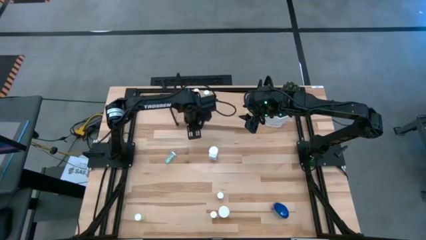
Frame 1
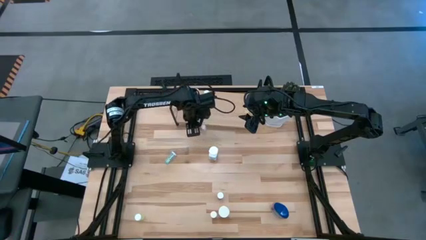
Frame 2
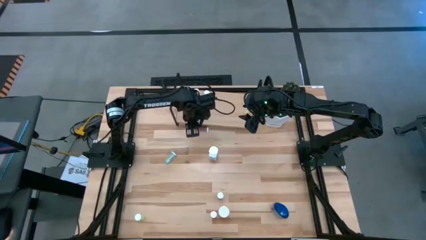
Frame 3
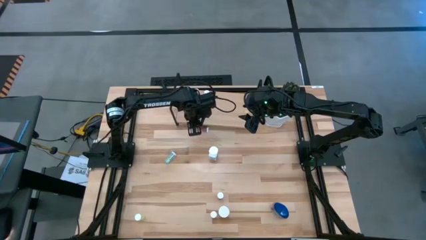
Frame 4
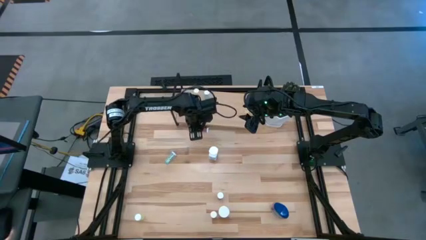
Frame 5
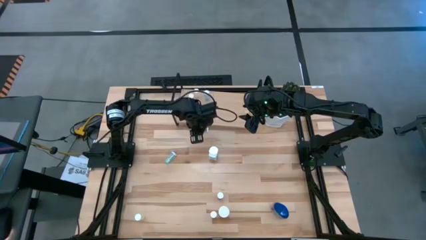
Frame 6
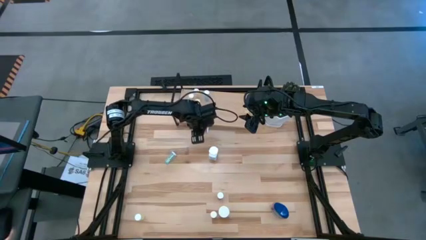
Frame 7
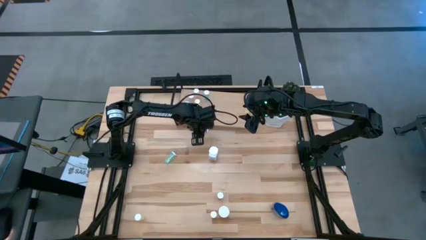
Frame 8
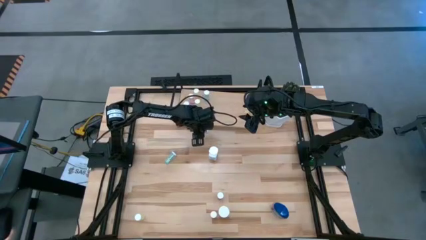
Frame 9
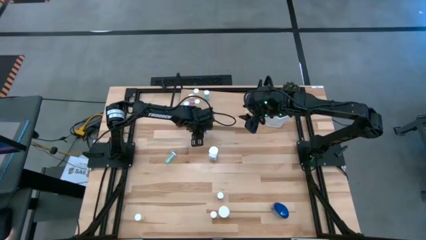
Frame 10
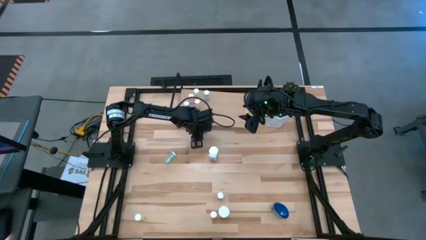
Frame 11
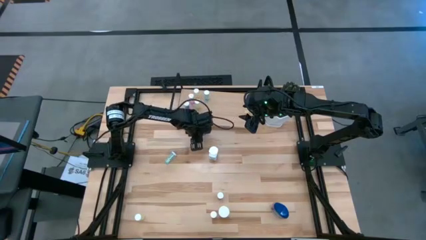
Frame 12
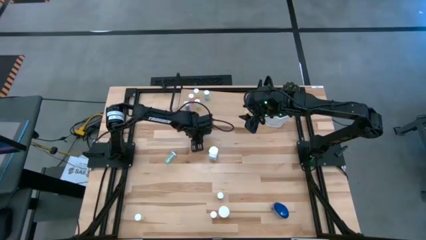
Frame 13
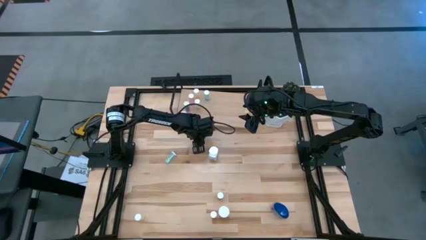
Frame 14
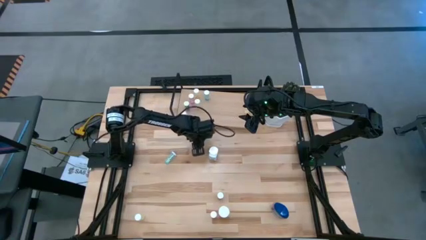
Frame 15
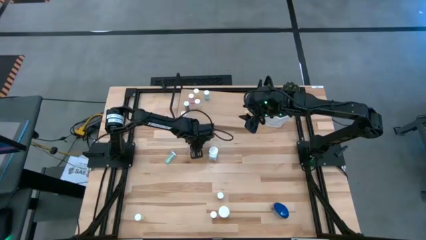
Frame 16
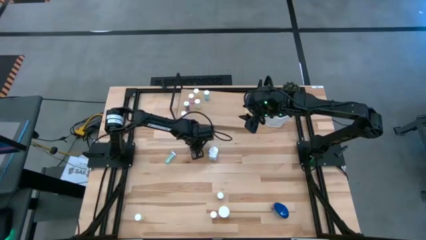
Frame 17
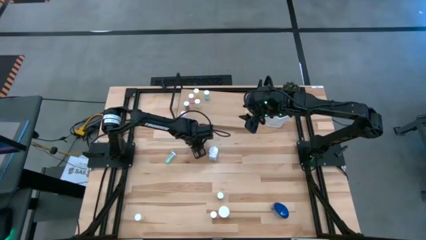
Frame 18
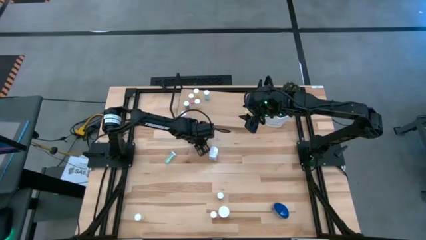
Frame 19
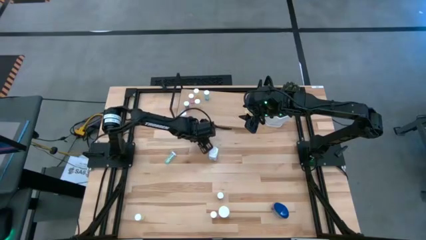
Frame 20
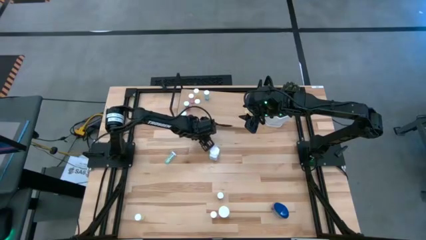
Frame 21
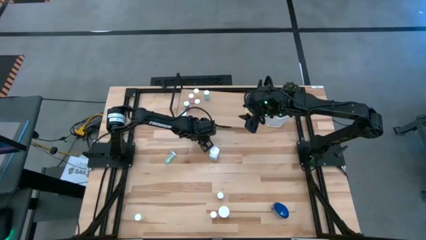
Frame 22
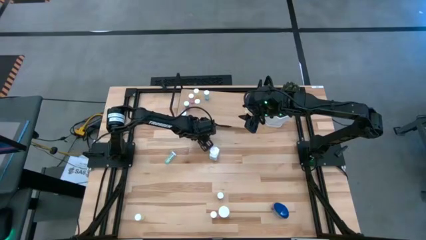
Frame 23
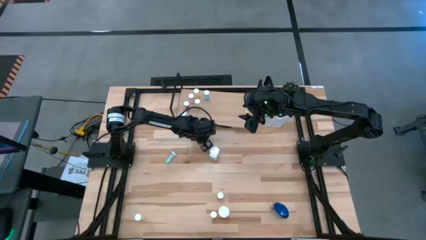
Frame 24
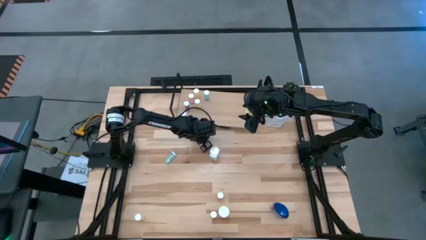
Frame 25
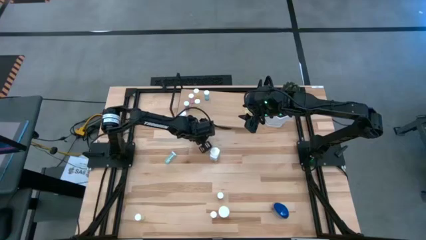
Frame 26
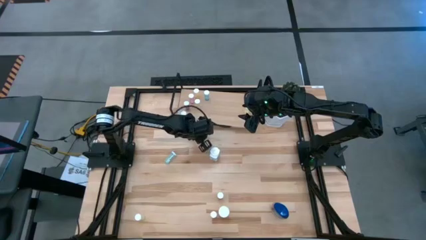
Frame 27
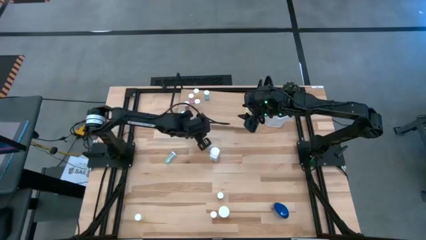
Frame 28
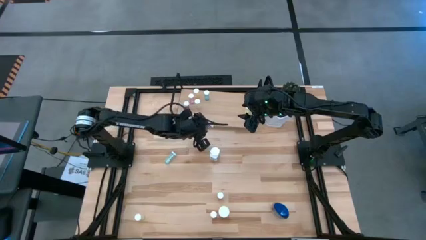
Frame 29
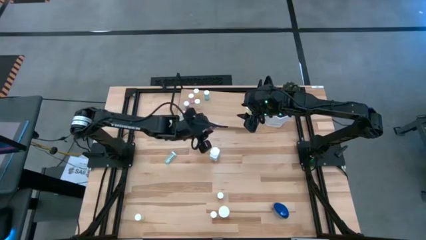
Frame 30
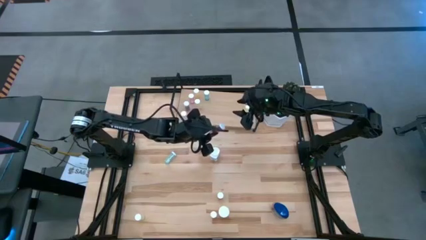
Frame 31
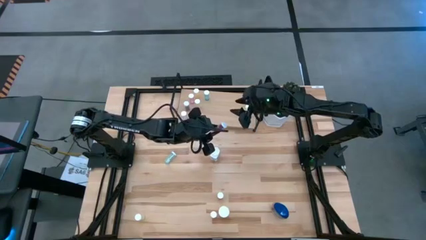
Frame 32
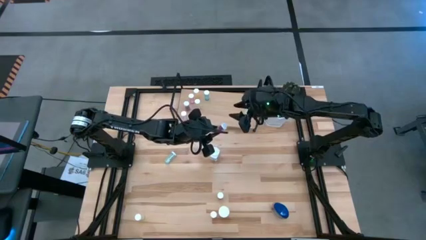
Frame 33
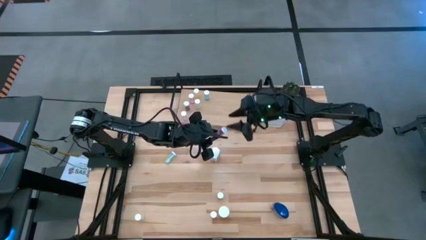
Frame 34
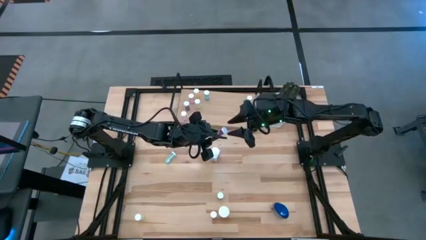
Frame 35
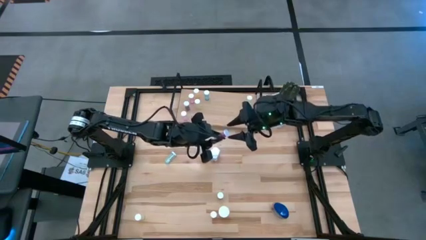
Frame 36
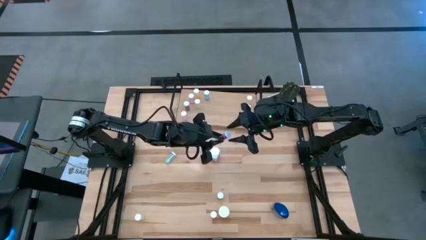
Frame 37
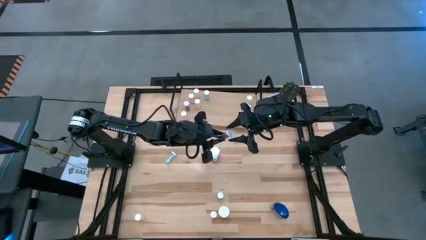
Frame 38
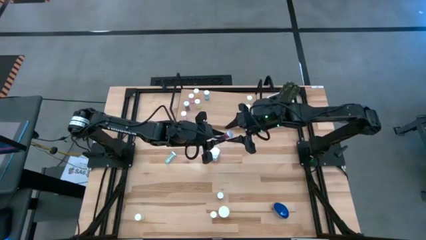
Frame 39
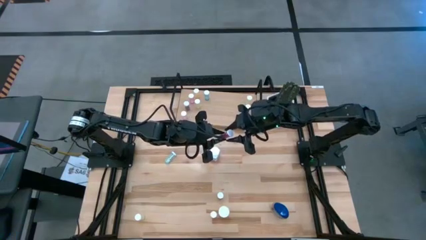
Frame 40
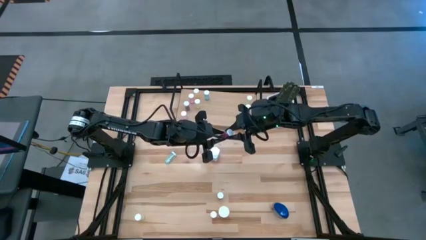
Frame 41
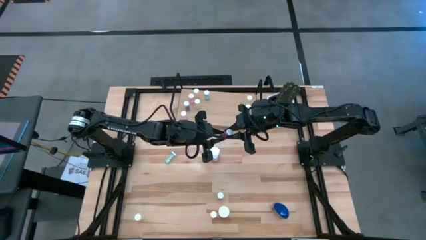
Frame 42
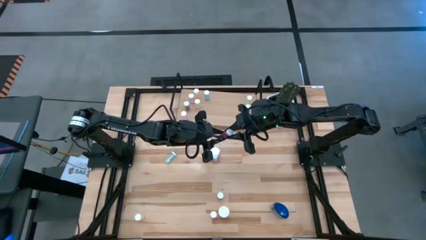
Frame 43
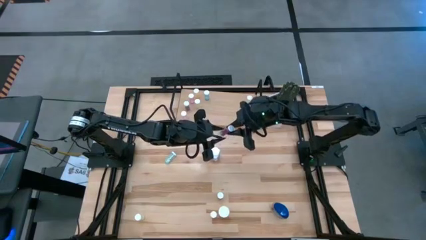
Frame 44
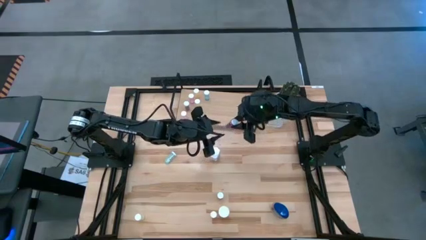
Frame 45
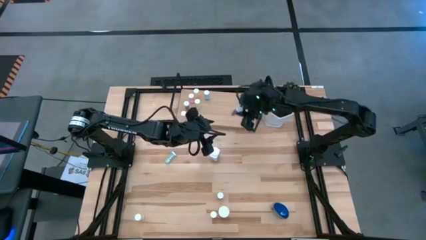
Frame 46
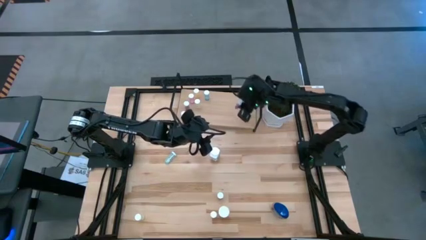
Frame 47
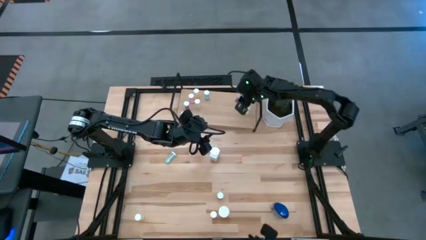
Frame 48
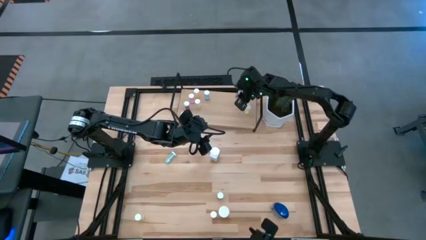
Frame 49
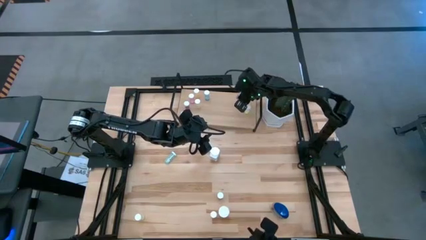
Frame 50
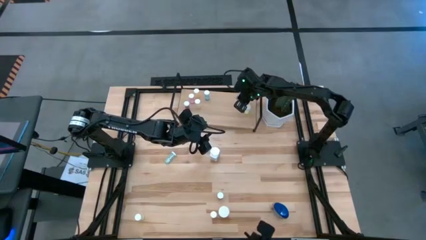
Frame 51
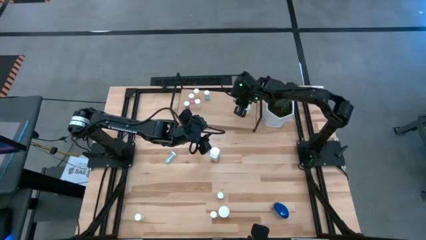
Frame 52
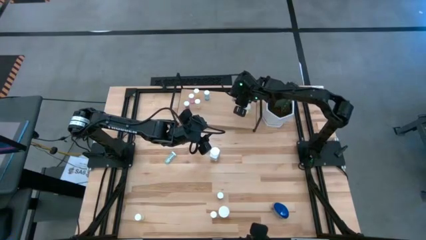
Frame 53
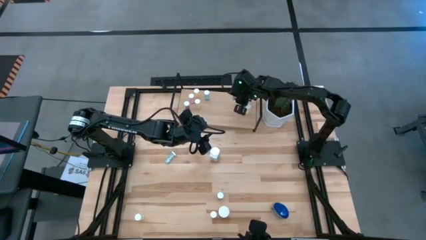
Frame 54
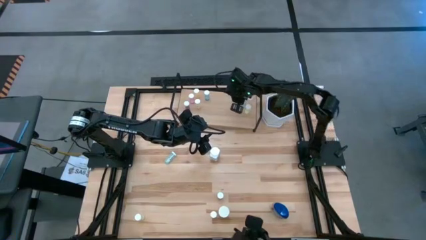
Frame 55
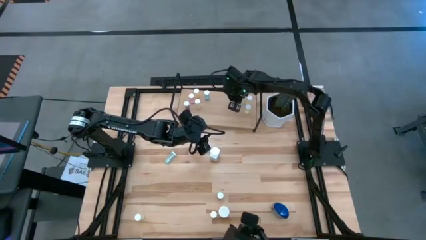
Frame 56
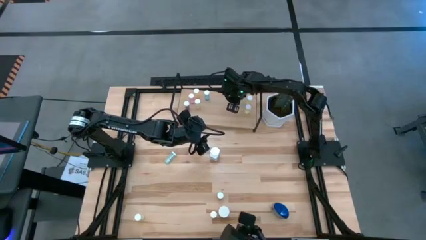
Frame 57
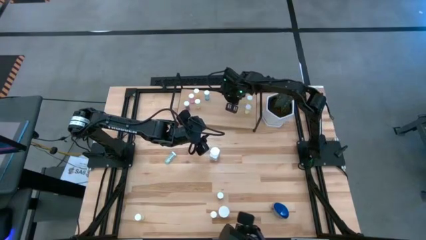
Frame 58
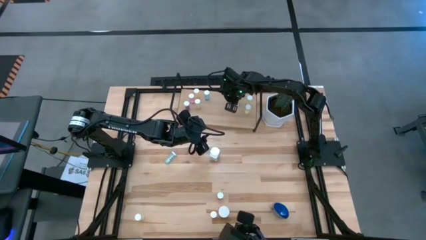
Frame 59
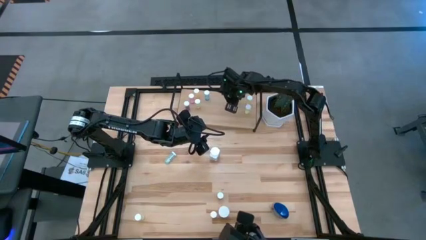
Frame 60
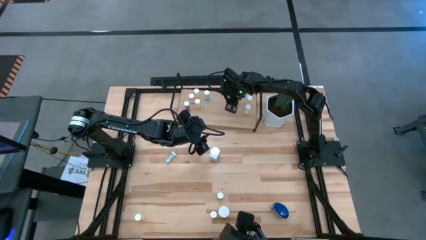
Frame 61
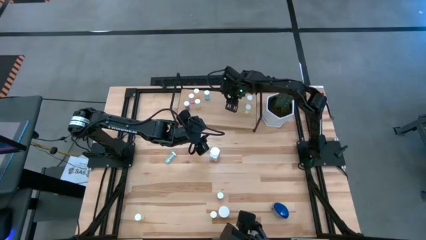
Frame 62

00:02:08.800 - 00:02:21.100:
Task: Pick and place medicine bottles onto shelf by color
Put the blue pill bottle on the shelf
